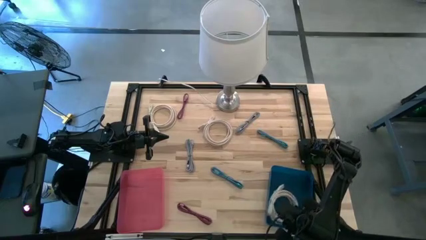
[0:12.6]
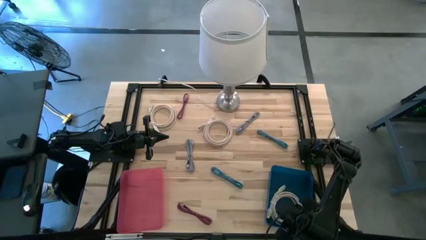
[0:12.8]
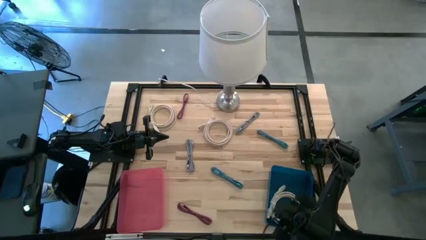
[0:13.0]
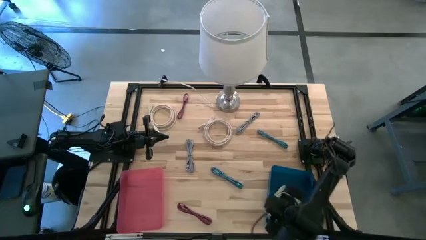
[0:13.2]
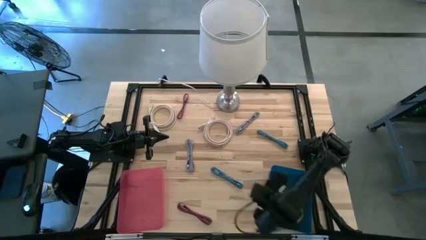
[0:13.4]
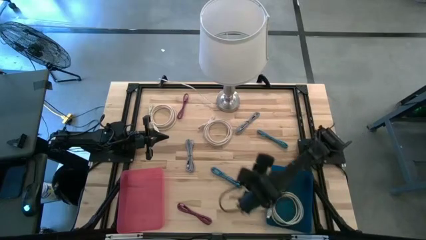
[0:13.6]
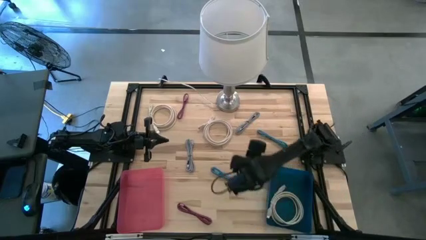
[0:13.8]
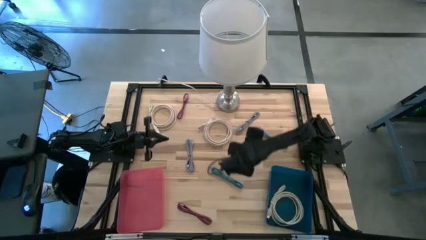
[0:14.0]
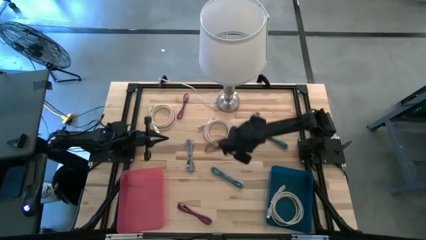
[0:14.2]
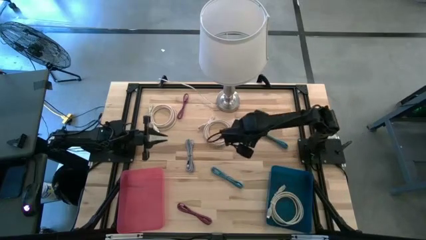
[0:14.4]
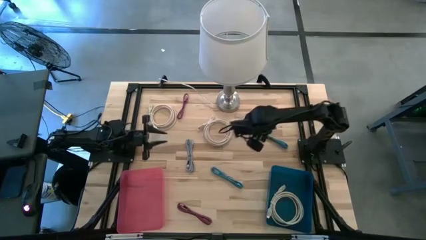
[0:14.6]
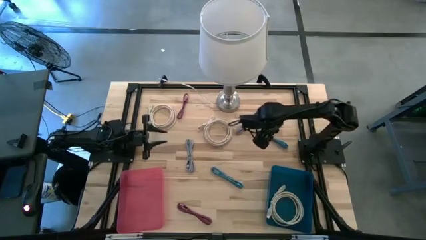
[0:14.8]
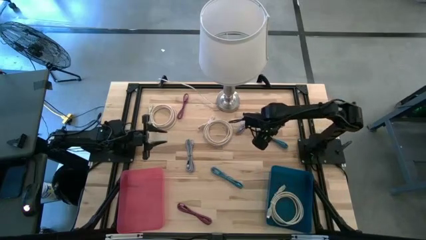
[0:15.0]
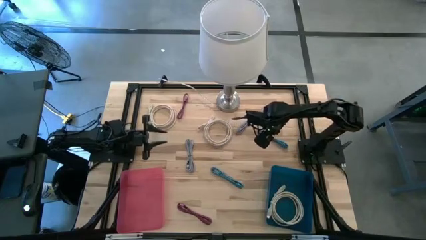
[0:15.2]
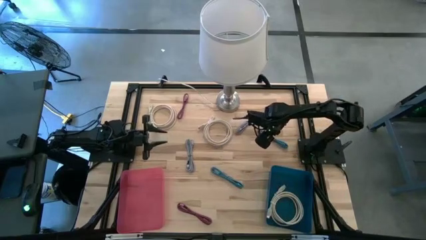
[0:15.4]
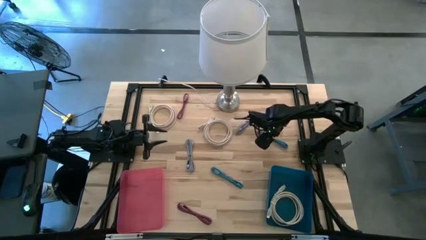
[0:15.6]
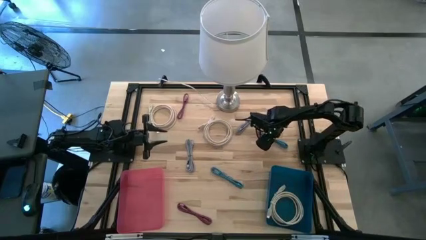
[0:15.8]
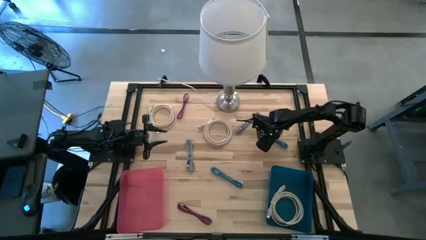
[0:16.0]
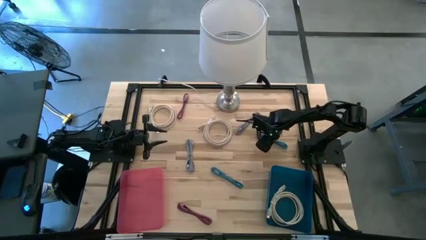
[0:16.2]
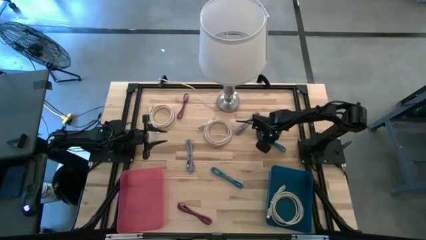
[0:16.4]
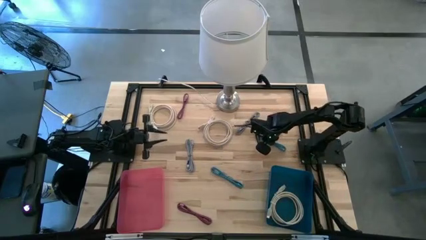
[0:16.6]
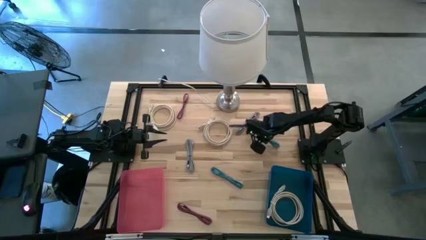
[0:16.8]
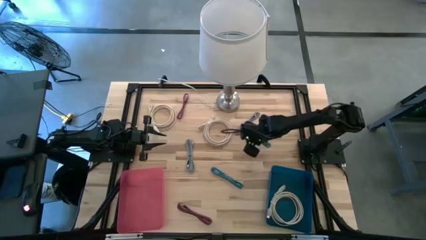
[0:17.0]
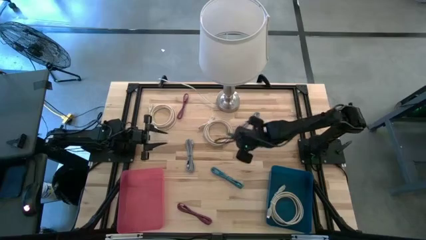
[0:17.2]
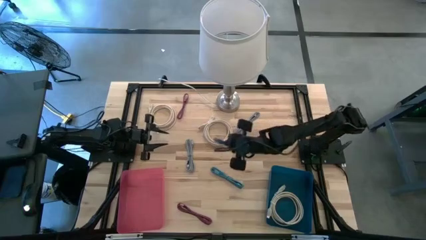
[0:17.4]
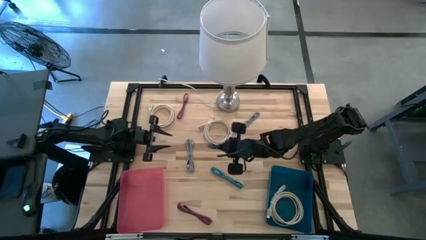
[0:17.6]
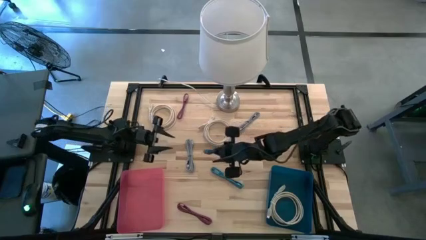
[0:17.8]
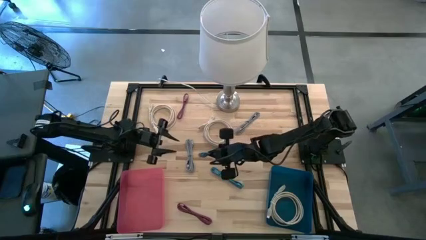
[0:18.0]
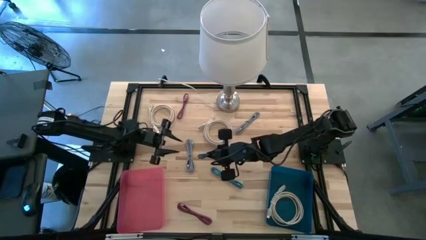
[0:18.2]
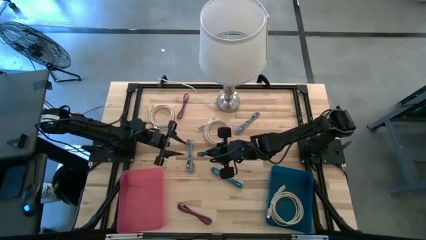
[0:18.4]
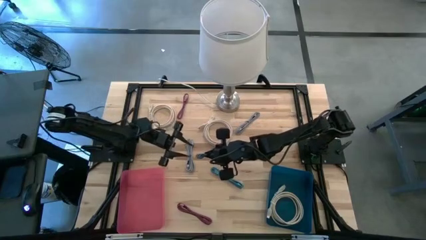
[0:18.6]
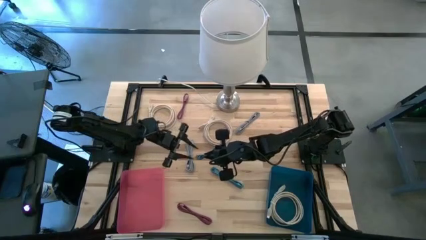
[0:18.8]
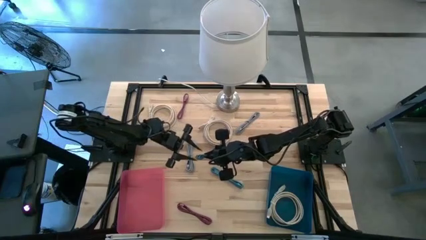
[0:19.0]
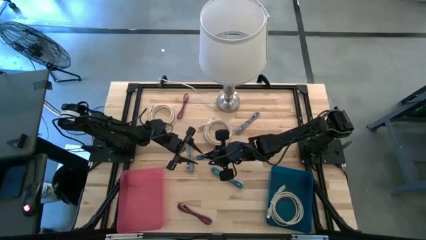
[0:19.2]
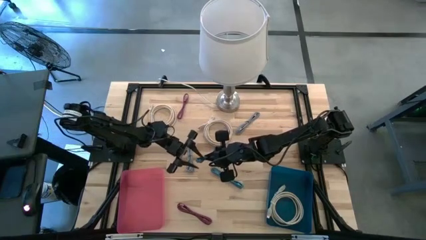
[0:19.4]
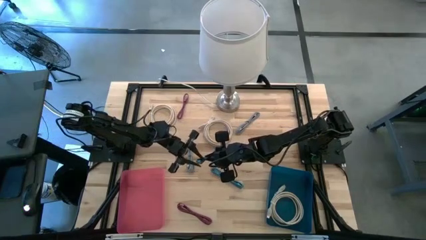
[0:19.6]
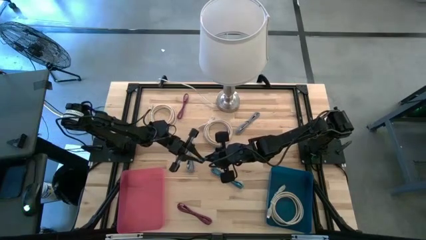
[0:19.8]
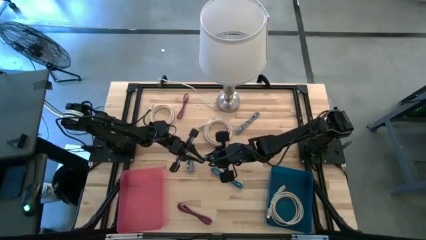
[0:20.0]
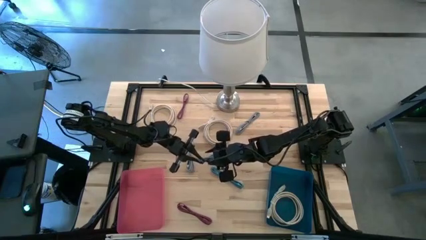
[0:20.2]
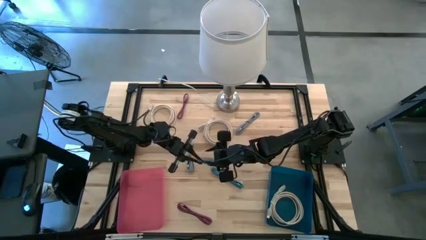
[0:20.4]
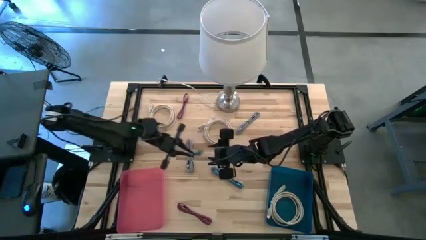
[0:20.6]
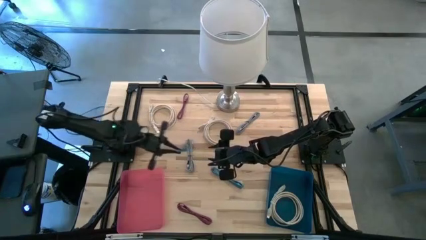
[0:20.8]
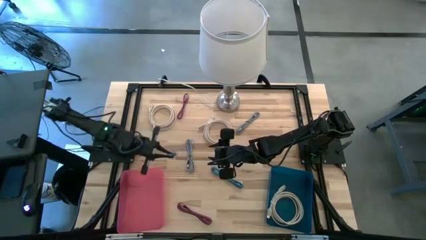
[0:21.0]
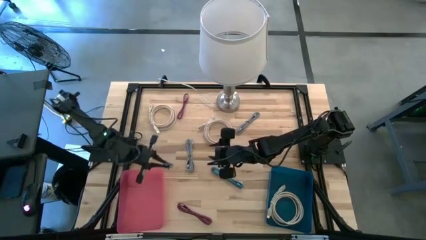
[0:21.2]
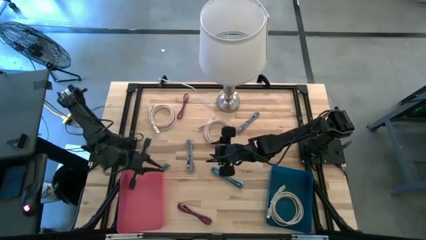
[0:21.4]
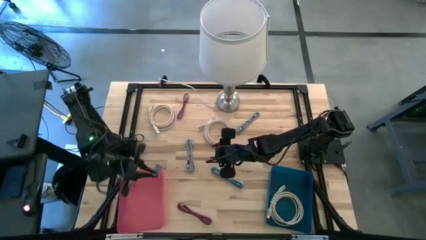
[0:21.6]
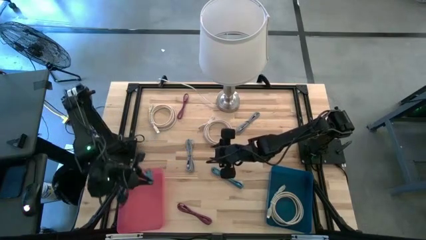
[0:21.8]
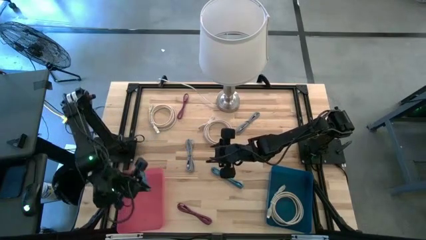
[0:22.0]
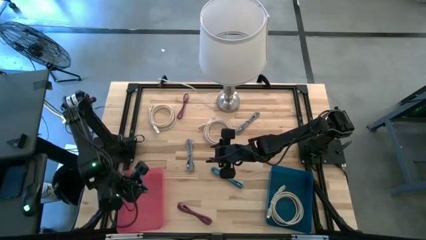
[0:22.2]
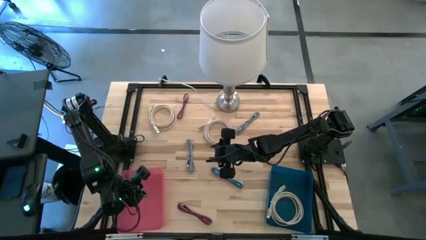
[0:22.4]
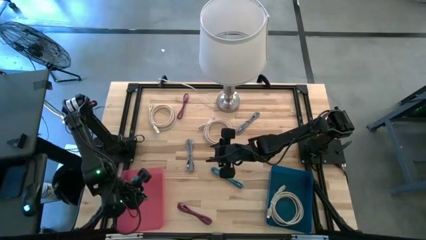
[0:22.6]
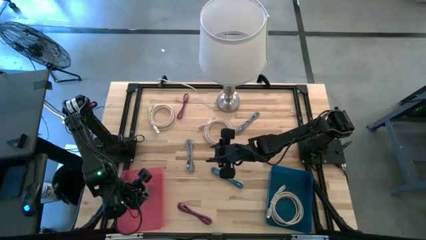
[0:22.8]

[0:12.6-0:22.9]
Task: Pick & Place USB Port
Put the top blue and black USB cable into the pink bin

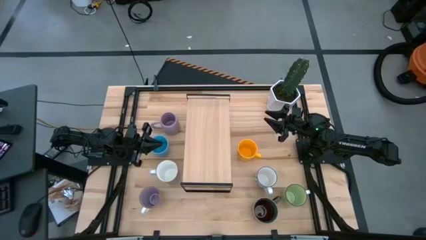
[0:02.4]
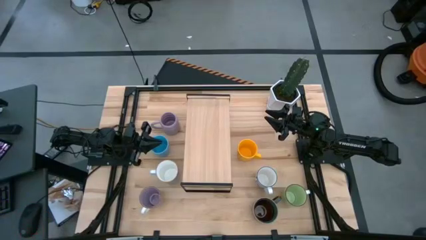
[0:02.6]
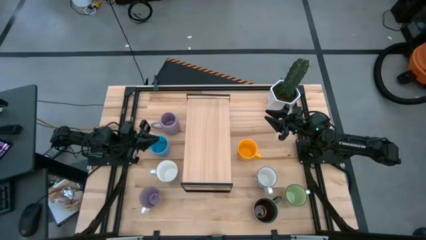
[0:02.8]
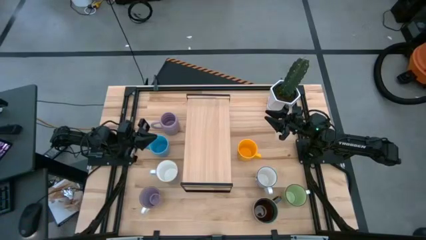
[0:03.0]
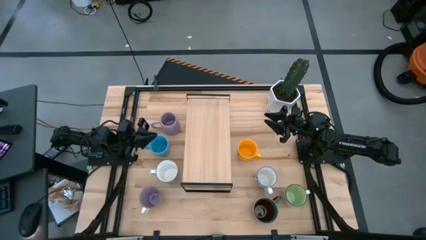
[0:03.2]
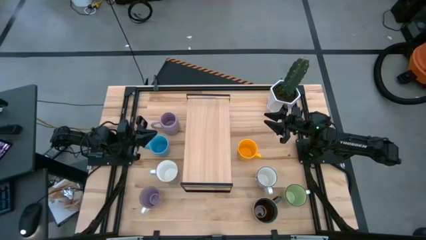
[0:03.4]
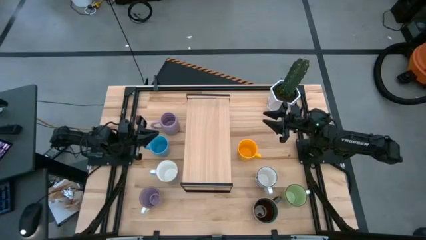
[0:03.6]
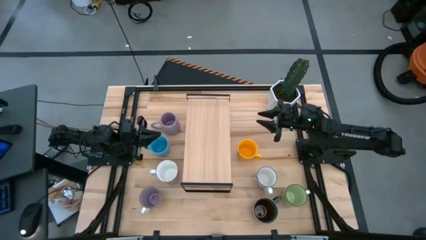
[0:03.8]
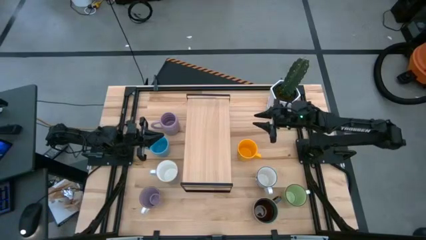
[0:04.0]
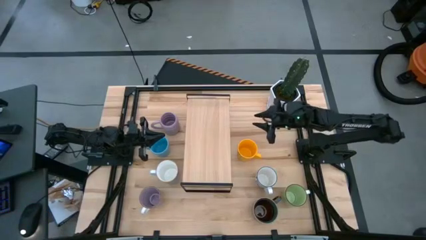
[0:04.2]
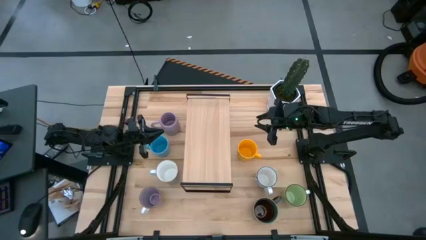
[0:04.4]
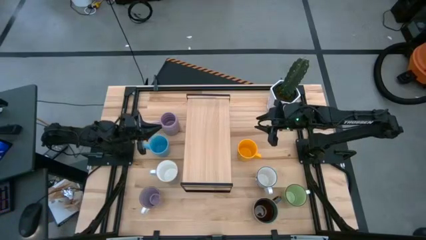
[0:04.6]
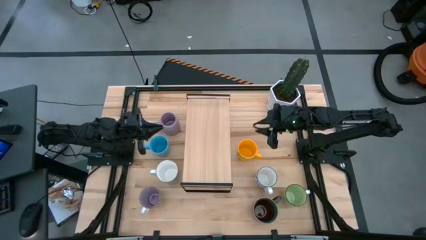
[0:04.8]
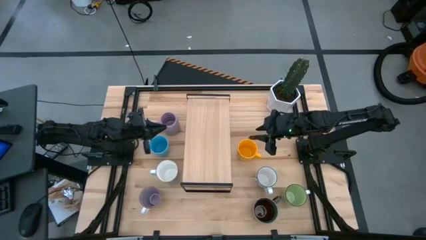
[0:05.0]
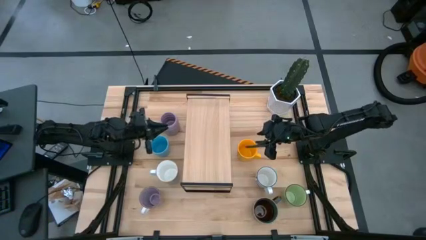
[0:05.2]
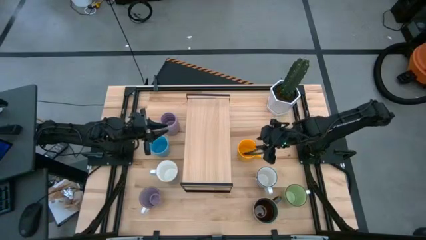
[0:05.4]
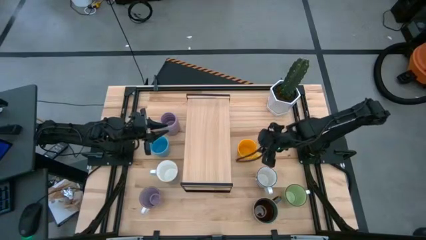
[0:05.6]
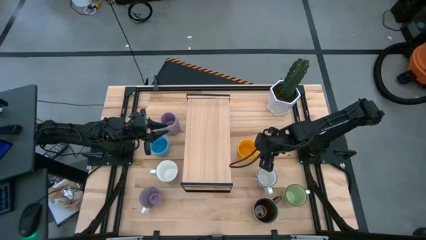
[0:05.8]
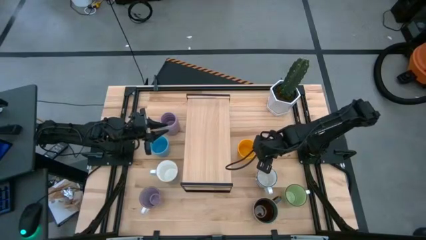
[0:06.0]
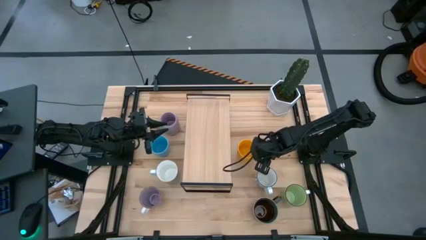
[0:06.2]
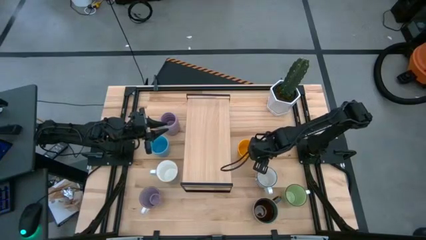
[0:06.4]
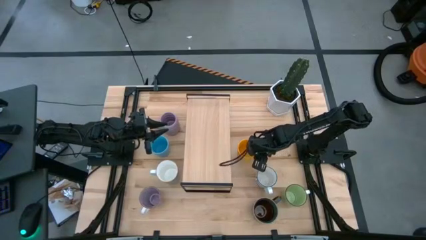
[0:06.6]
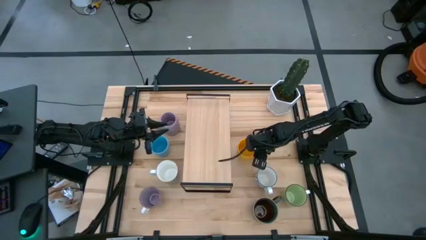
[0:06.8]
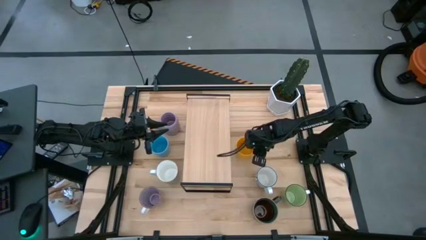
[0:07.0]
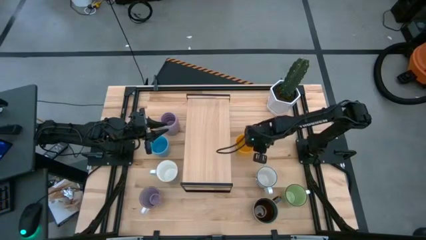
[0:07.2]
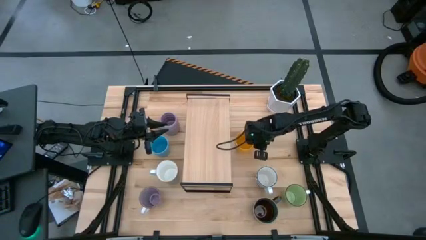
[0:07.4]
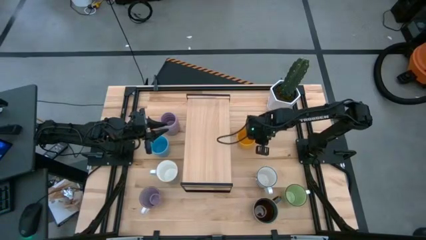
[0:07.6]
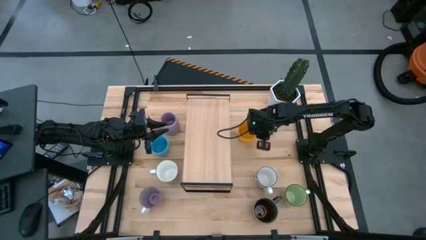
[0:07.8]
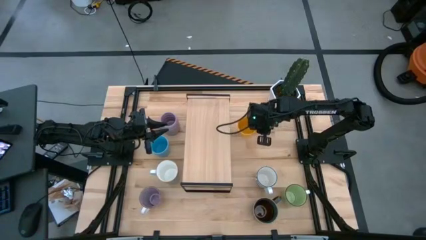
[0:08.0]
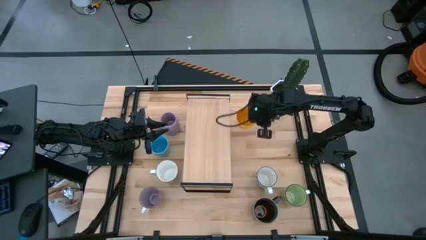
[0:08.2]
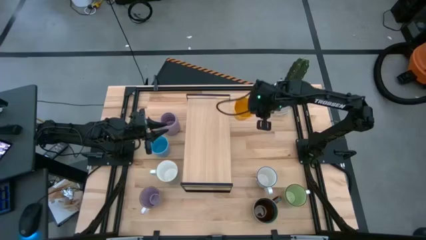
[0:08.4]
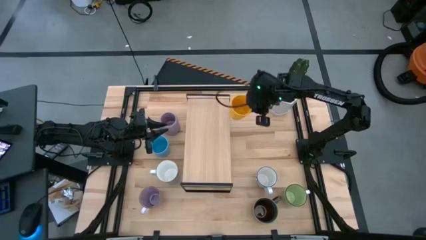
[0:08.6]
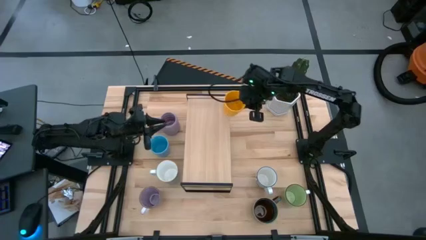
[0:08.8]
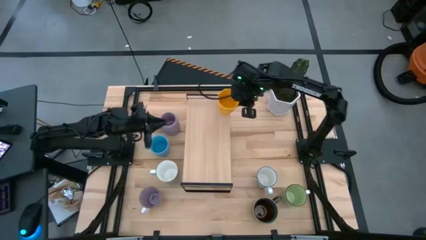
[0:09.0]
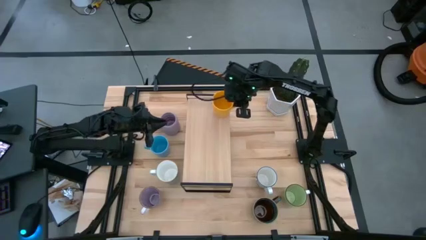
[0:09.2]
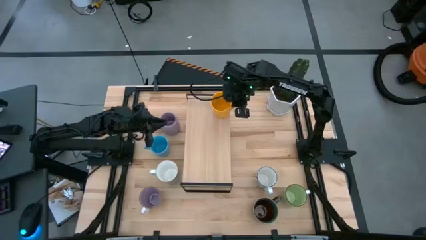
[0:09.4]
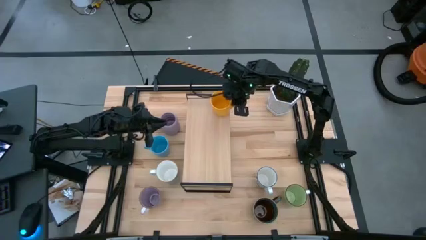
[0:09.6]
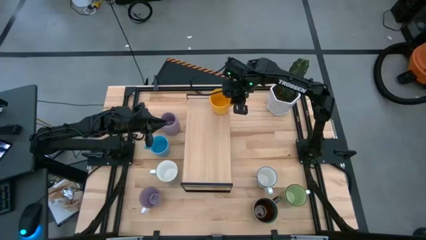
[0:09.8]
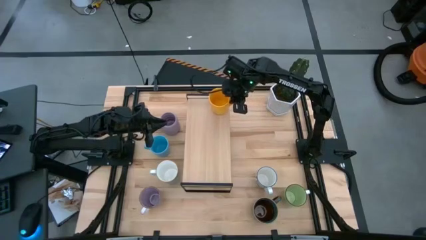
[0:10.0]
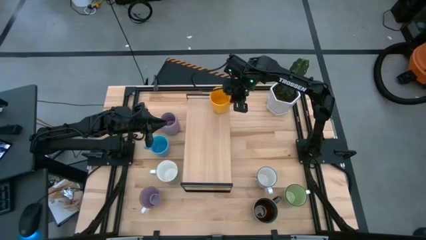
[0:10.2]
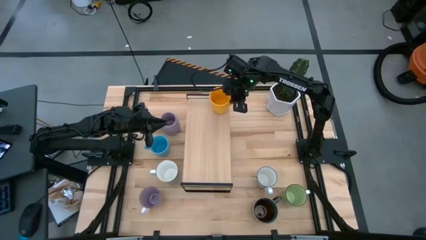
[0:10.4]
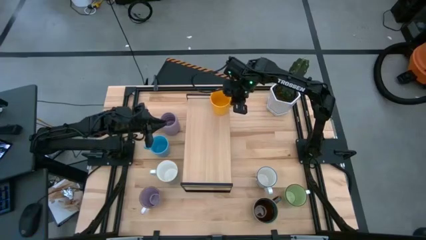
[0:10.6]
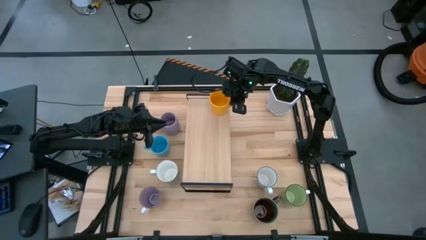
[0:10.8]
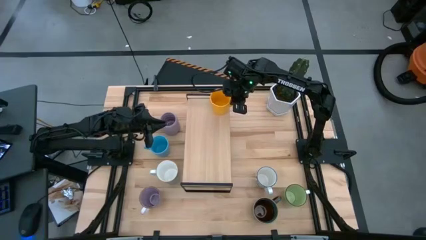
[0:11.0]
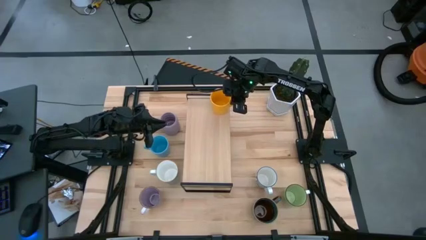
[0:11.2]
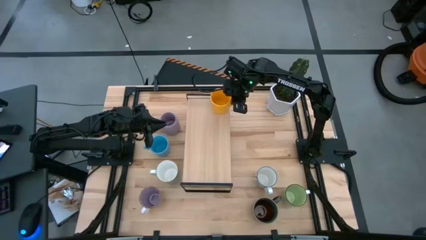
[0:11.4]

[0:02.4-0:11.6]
Task: Place coffee mugs
Put the yellow mug on the shelf
